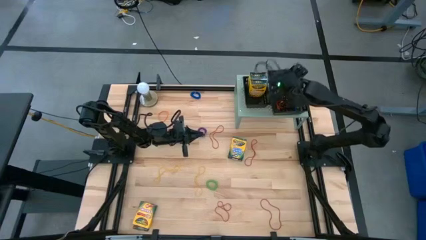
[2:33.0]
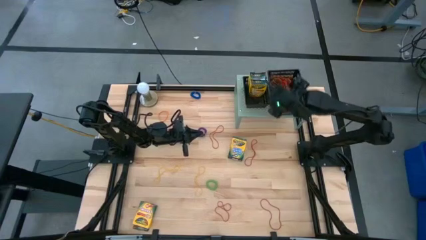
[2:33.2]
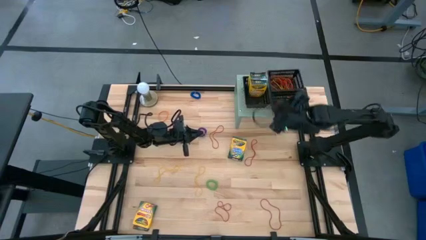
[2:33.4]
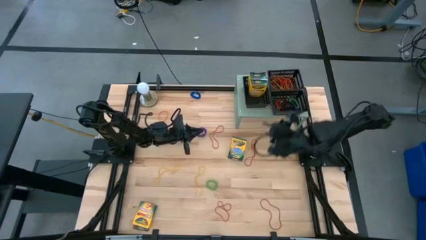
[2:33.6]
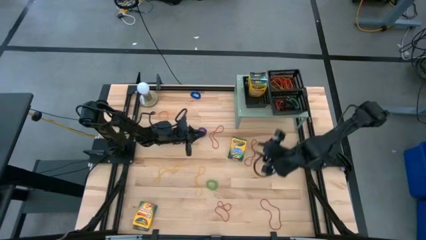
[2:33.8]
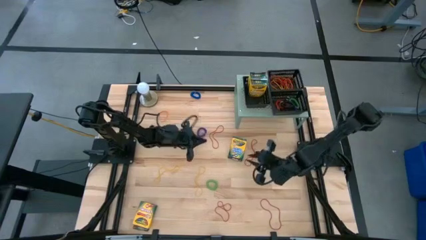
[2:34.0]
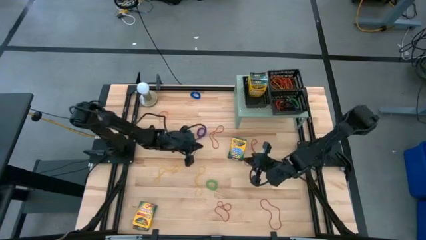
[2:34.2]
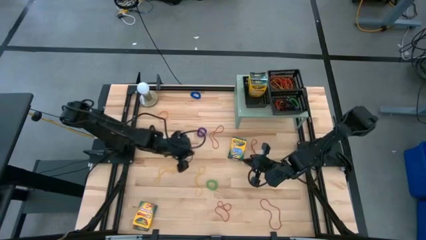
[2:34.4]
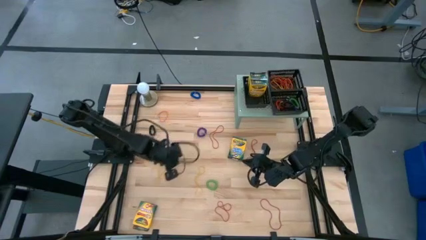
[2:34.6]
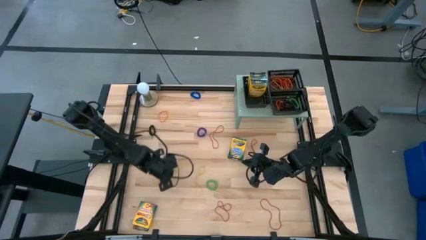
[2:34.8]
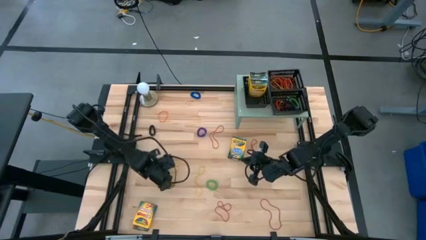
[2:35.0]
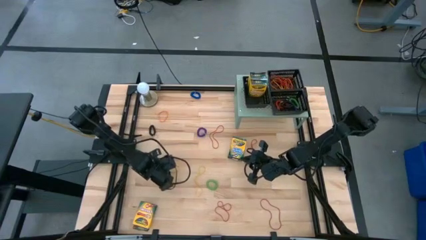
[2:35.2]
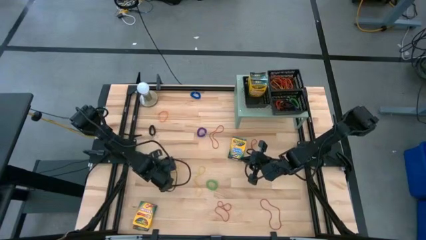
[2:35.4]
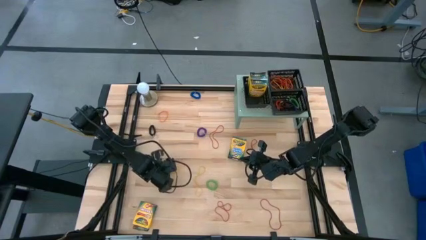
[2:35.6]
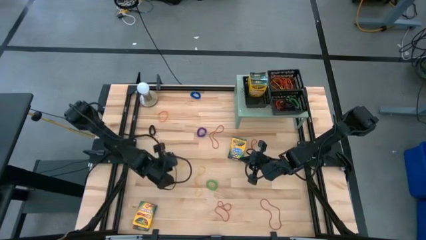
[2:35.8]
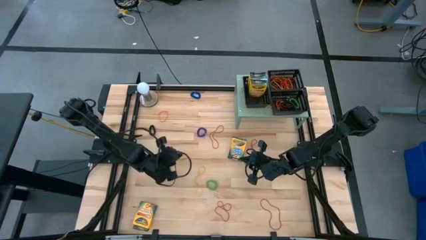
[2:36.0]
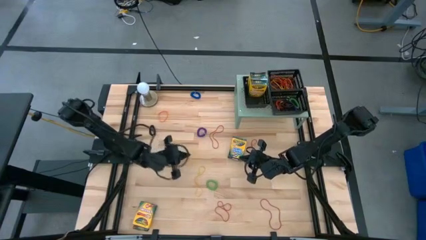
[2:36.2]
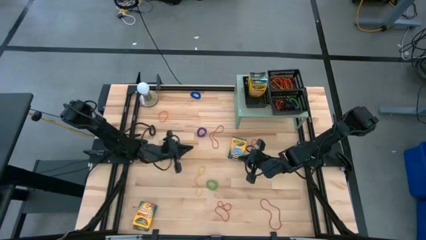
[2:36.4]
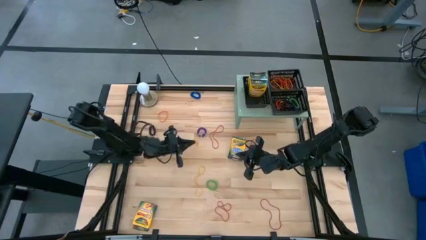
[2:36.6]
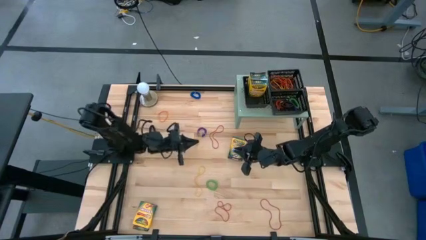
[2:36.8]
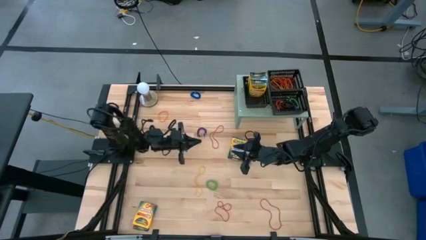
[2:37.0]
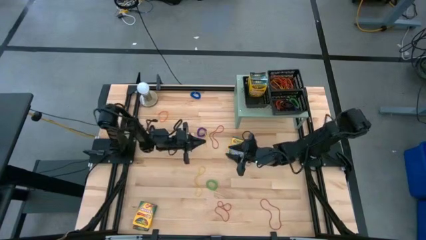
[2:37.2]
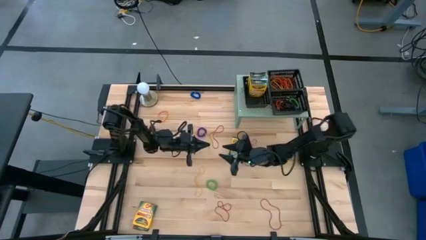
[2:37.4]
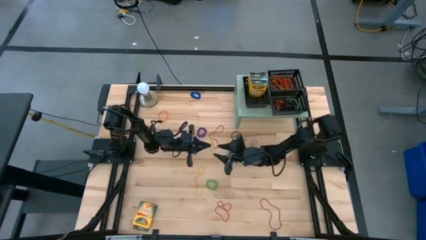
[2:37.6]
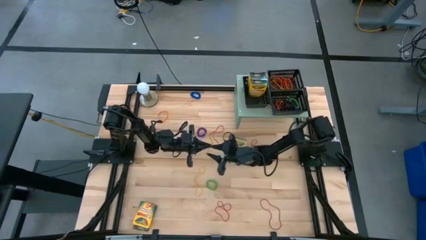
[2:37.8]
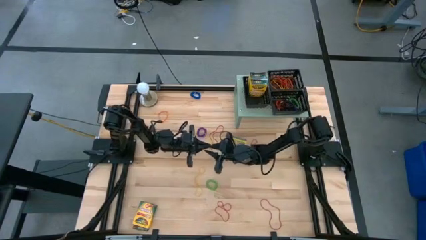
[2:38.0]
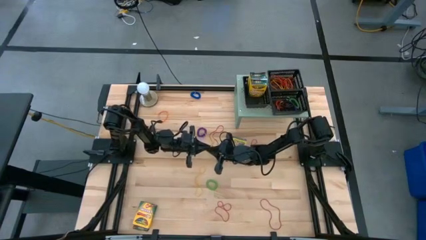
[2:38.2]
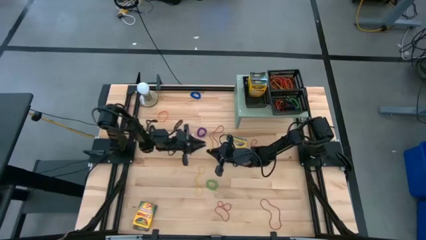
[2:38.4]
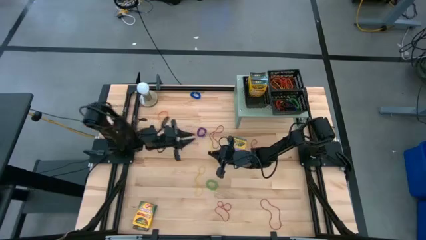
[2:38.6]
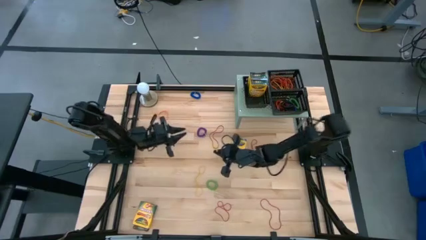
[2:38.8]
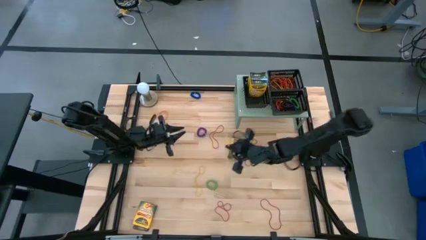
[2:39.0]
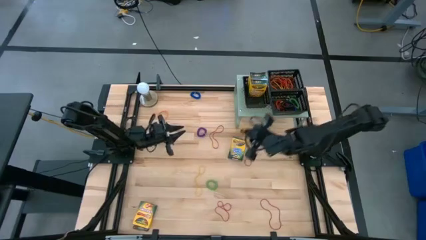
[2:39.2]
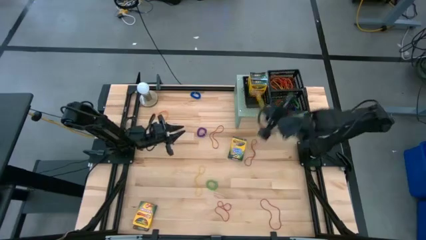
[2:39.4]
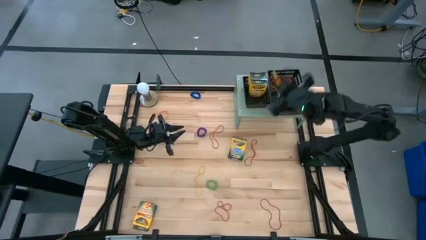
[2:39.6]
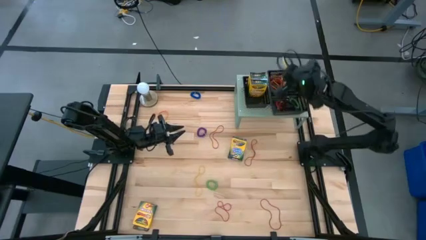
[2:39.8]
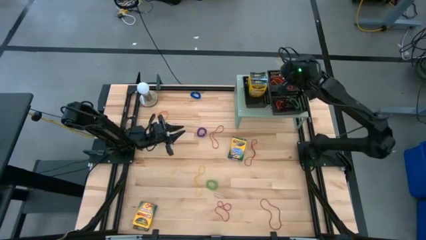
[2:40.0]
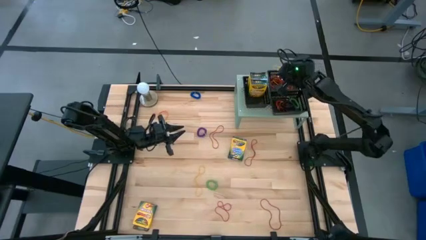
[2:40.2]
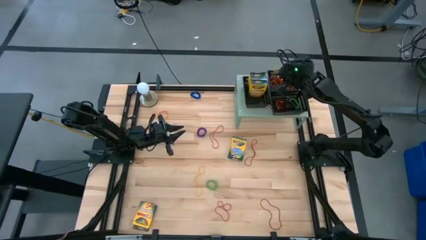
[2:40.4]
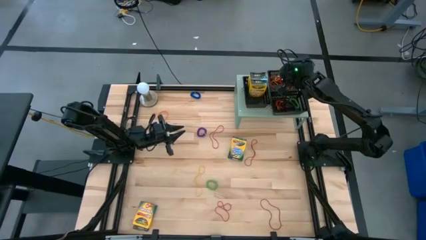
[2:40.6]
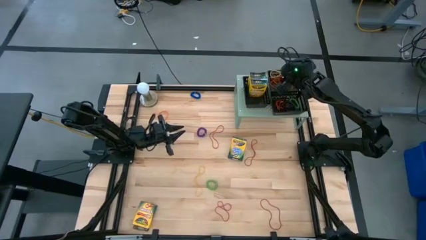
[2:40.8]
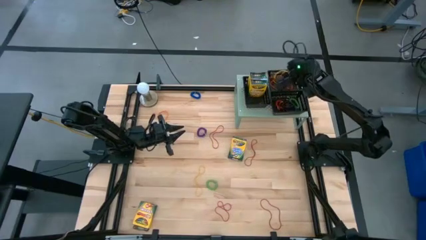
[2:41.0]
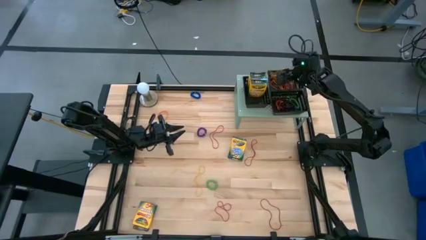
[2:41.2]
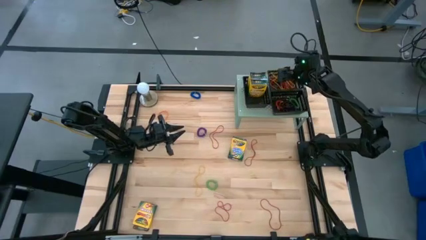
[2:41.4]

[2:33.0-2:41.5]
Task: Pick & Place Office Desk Supplies
Put the left yellow rubber band into the top right black bin on the shelf

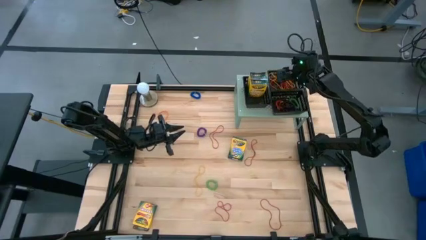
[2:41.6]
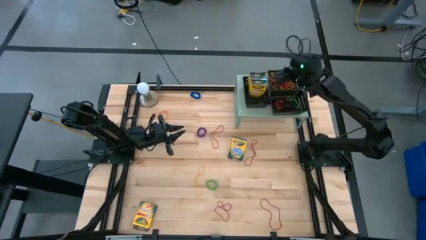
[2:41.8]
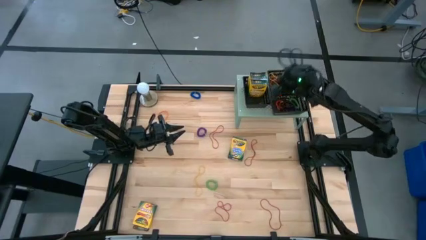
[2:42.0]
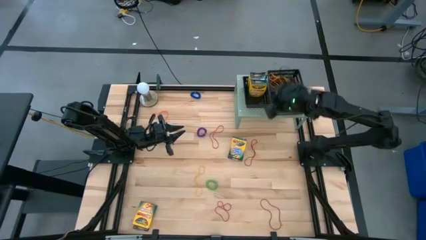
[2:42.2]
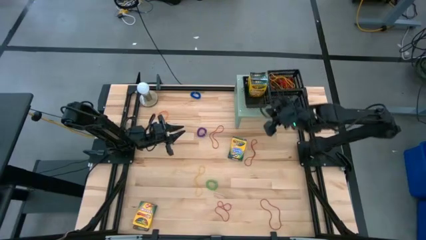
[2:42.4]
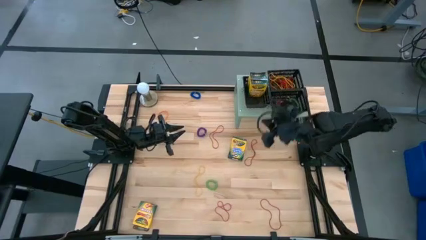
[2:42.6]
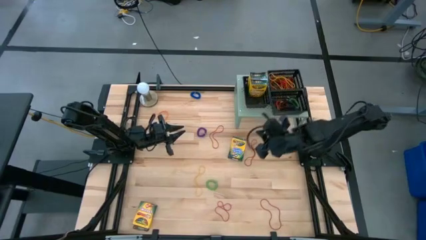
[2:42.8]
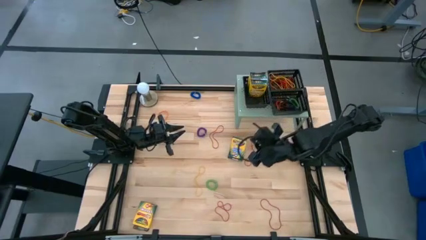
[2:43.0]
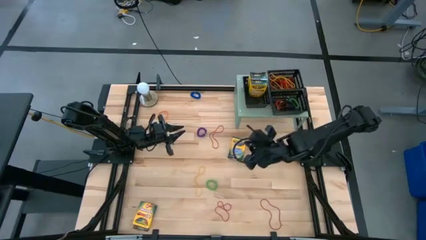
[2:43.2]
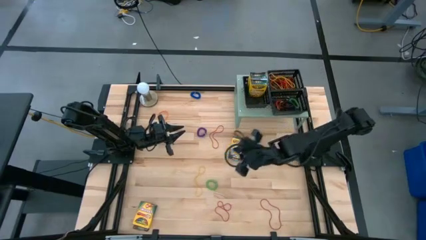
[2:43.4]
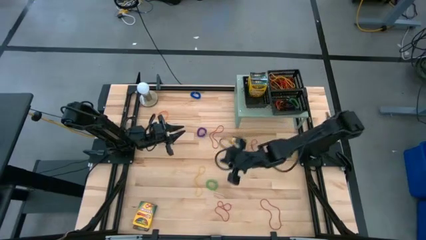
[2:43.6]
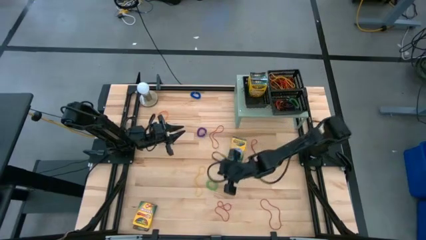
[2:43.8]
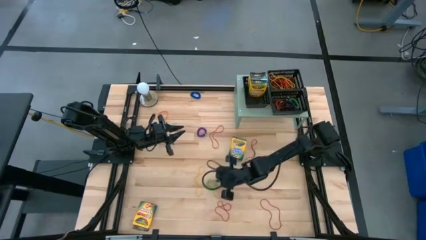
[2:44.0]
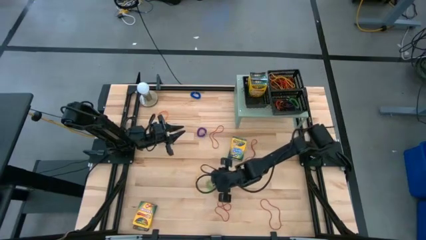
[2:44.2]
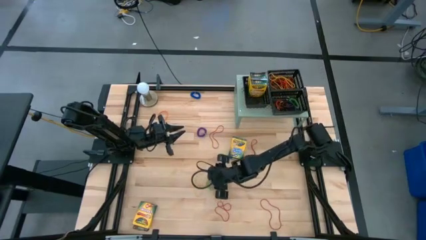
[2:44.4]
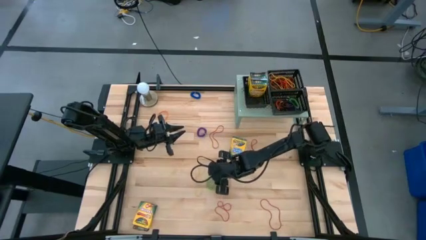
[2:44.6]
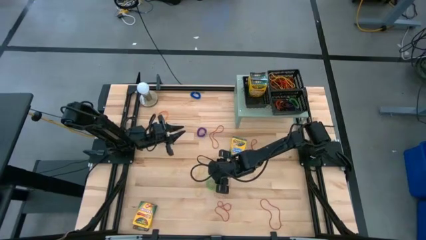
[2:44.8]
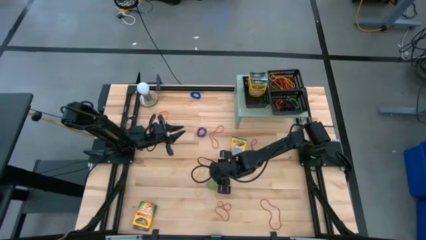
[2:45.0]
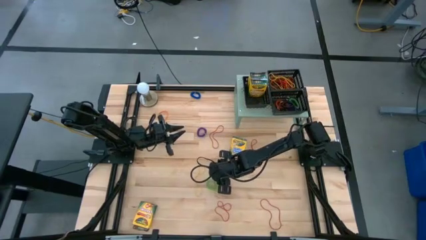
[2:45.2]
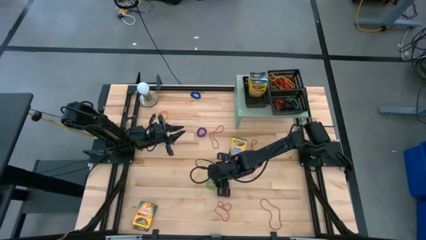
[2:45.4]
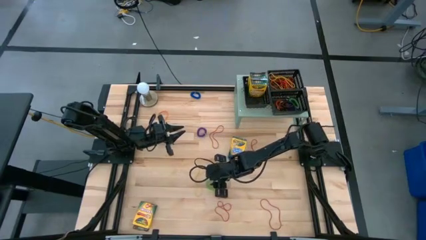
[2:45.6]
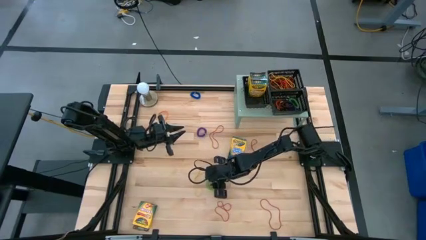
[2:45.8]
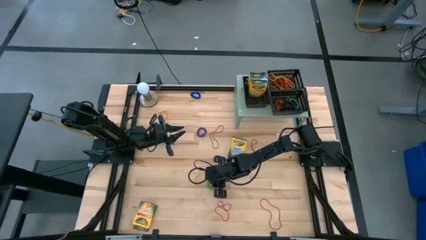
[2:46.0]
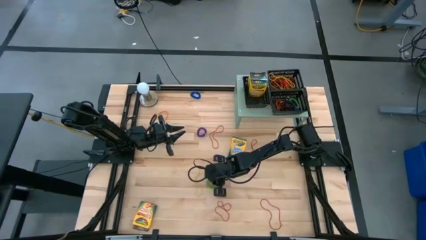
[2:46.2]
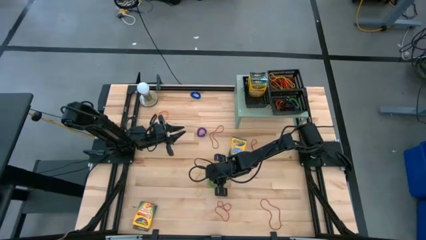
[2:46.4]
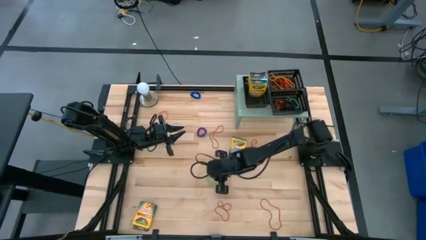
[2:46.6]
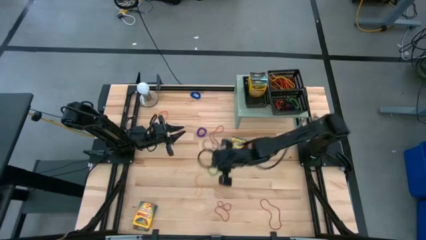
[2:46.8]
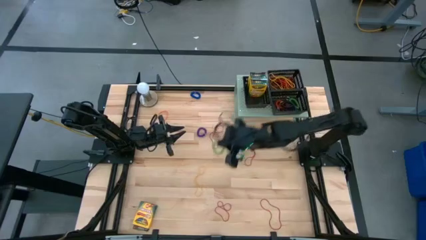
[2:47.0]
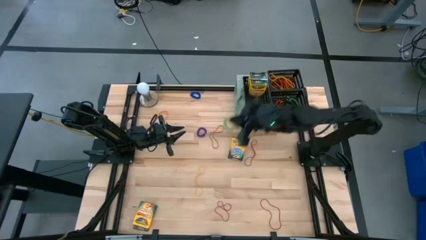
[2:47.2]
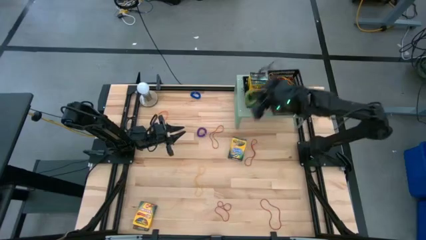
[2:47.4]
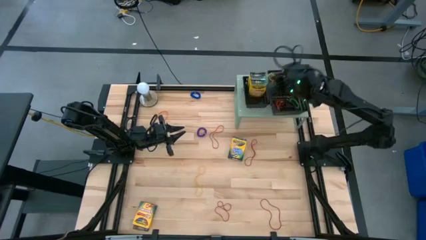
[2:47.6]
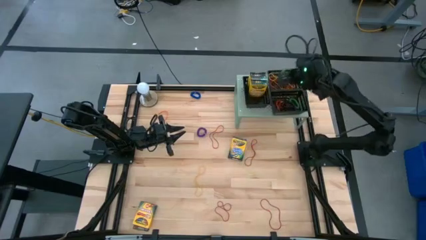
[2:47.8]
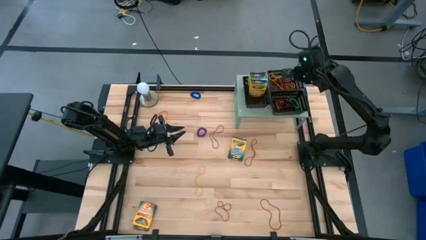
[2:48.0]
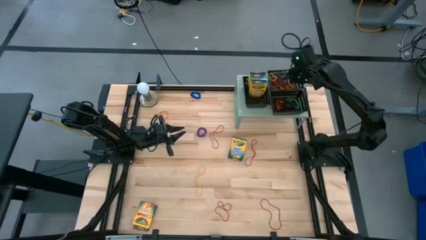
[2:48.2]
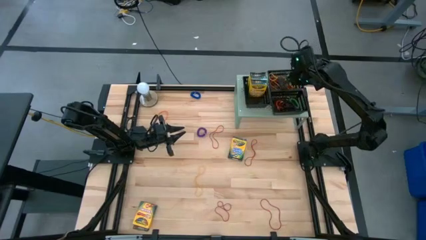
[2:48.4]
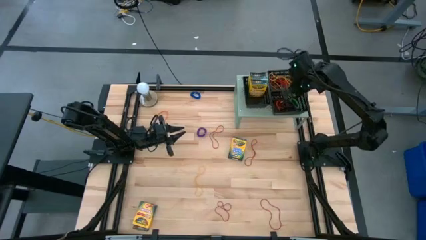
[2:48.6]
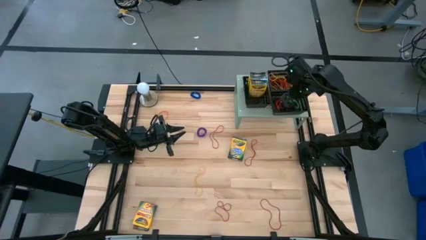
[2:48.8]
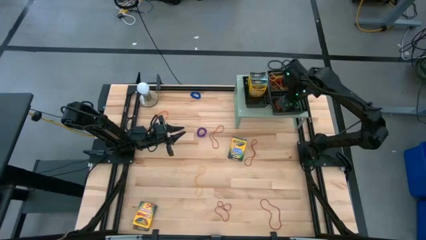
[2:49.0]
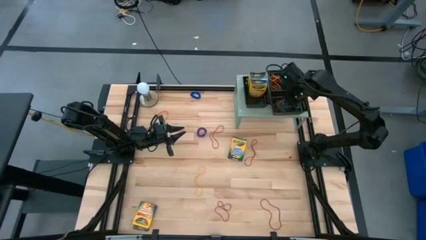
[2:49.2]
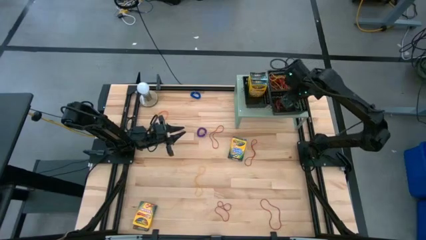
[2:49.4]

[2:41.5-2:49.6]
Put the green spring keychain into the bottom right black bin on the shelf

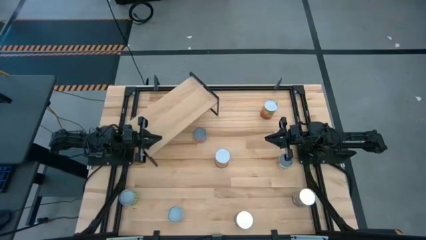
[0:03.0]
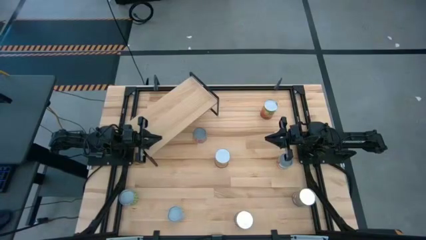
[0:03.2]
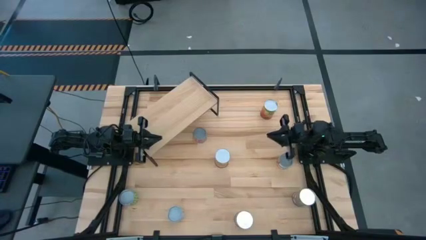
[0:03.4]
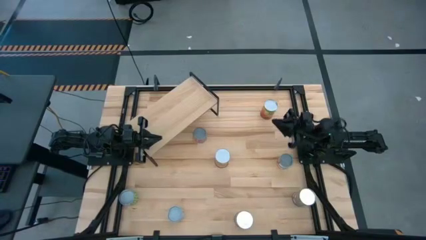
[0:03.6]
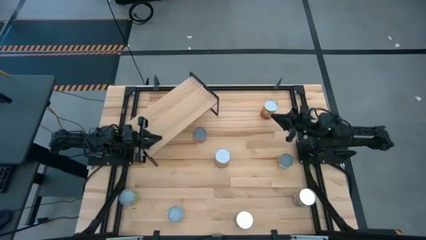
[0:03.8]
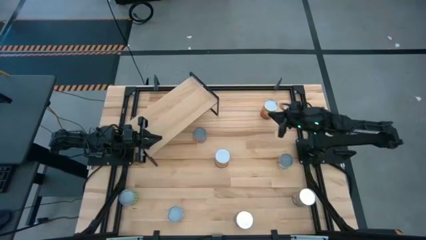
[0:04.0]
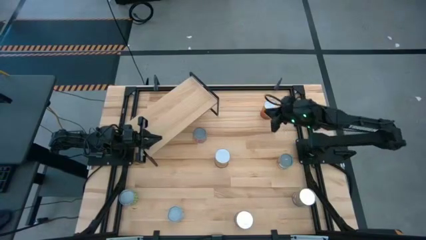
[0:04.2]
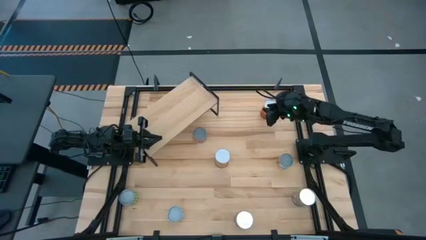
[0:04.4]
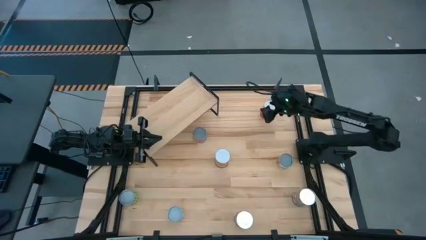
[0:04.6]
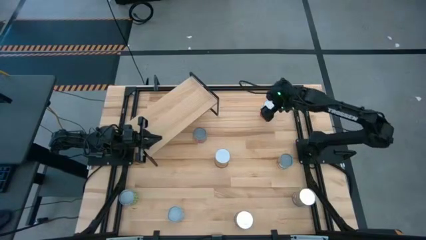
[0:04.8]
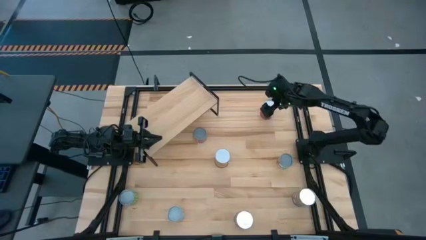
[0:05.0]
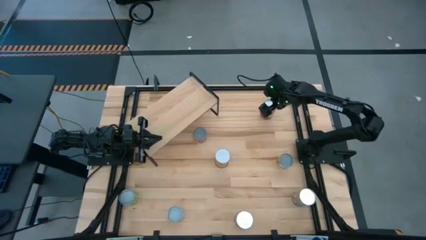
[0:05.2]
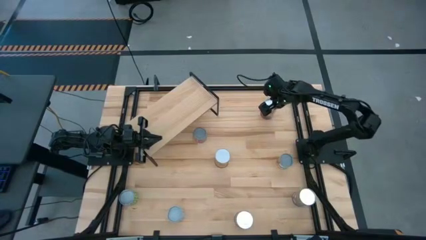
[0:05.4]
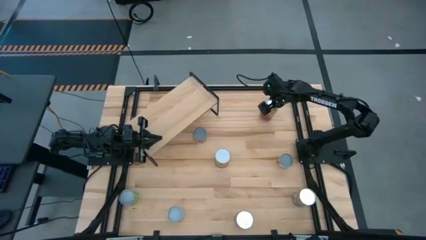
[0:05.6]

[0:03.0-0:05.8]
Task: Pick and place cans onto a shelf
Put the right large canned corn on the shelf
